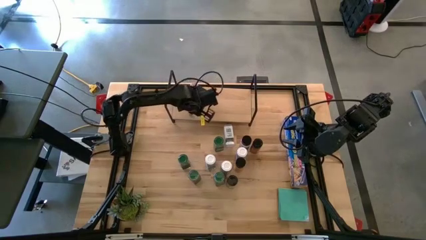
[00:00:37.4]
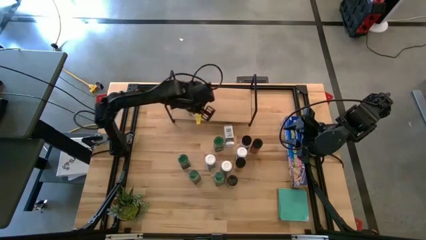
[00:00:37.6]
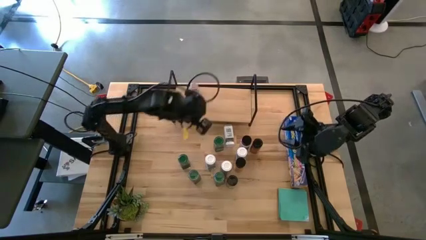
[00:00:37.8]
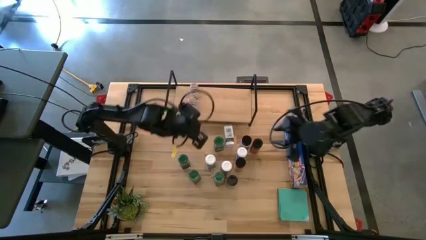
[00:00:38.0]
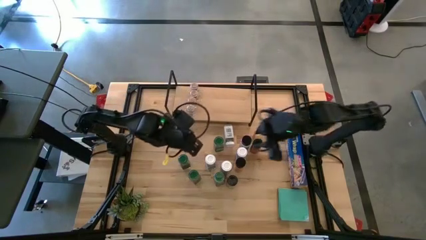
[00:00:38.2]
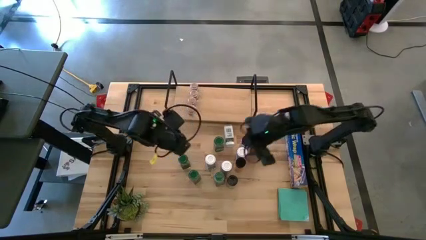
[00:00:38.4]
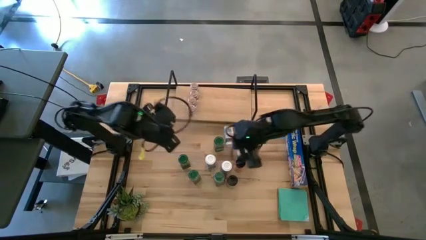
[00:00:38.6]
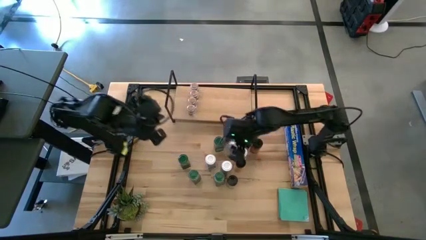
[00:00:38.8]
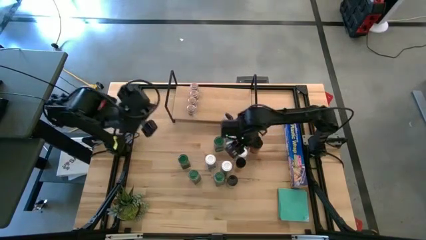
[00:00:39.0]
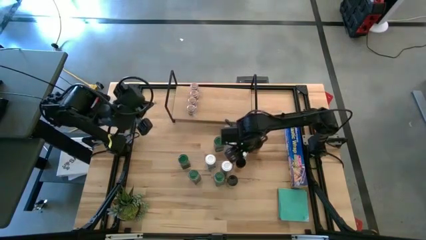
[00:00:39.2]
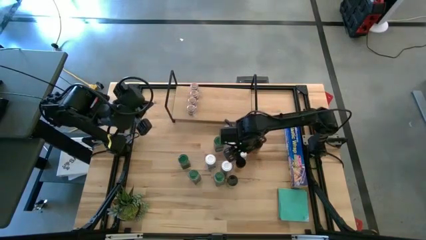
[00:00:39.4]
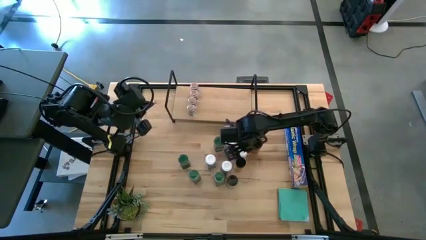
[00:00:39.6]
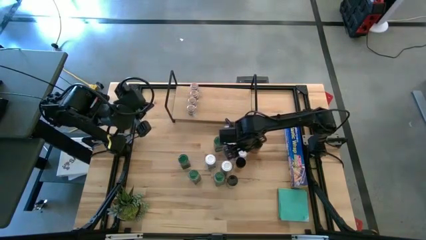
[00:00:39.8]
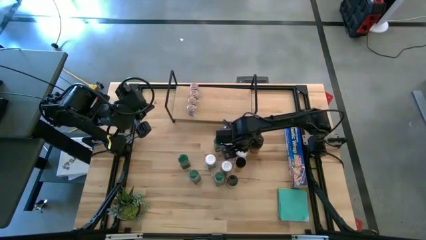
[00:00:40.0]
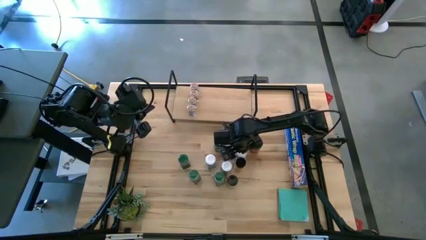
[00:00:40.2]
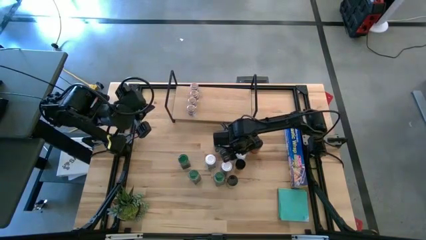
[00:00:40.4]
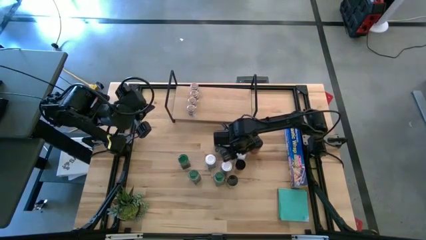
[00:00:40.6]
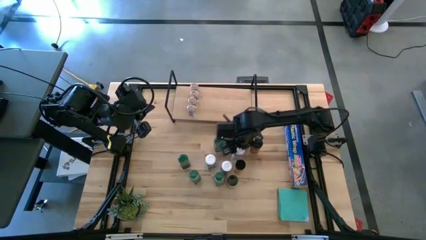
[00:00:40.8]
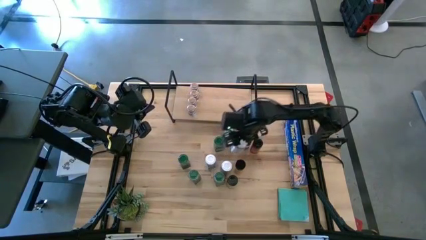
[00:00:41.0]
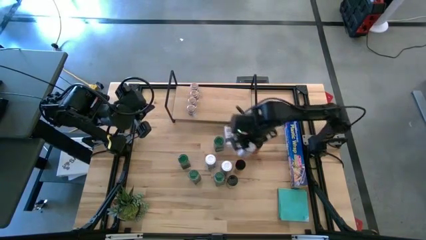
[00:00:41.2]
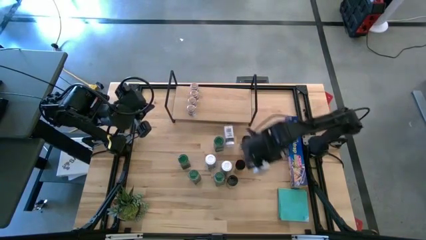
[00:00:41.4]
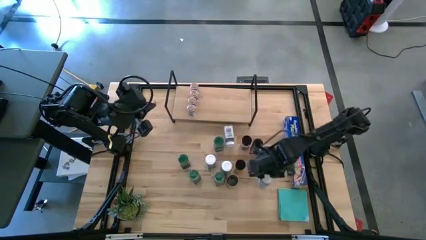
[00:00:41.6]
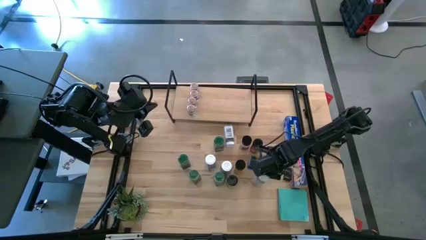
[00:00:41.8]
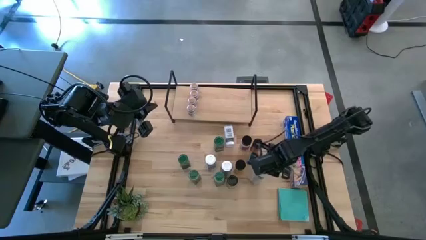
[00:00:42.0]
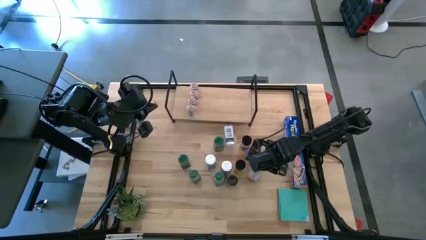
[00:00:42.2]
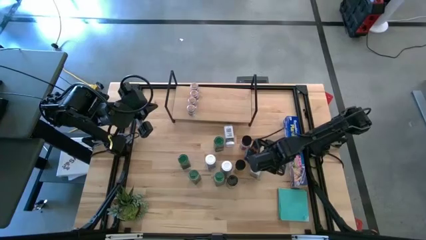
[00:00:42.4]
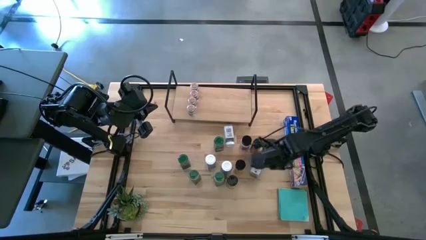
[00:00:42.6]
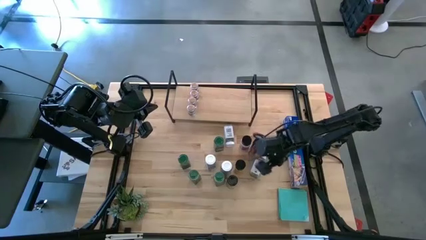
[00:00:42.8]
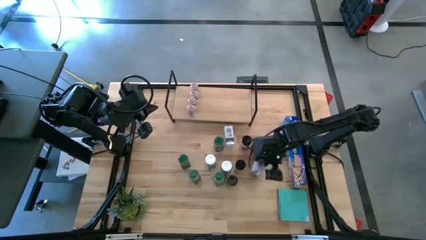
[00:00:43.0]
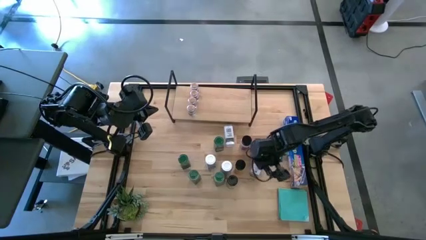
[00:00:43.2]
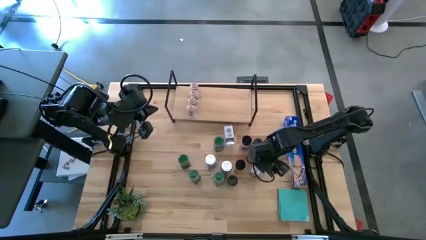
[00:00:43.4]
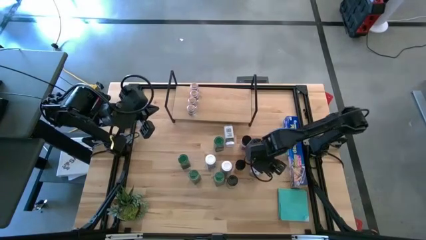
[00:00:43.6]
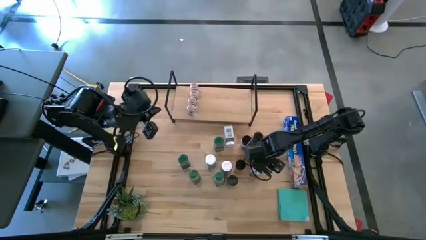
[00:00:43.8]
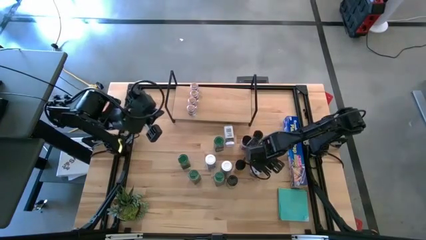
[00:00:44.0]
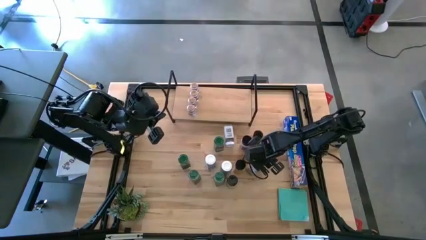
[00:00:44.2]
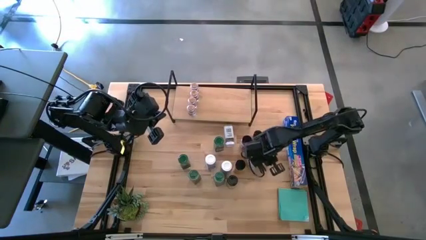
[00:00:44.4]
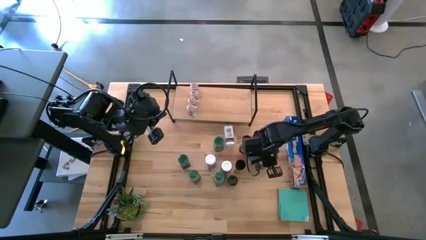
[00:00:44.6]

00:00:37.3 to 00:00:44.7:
Task: Shelf spices
Put the middle right white seasoning bottle on the shelf

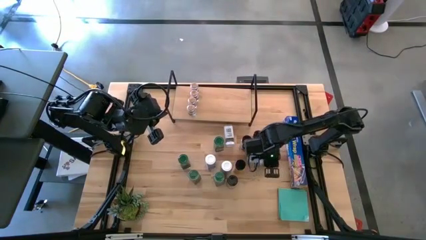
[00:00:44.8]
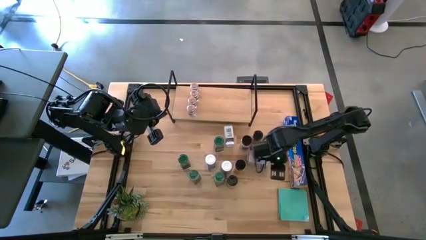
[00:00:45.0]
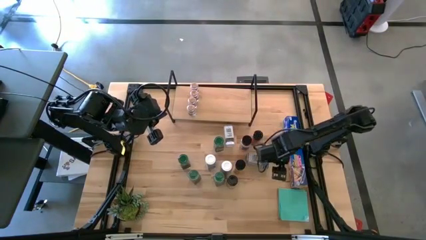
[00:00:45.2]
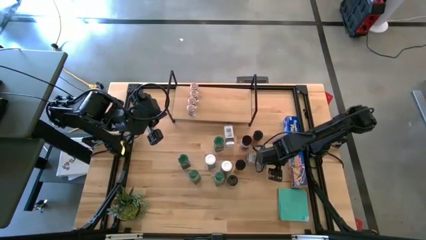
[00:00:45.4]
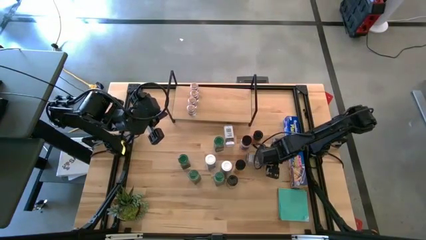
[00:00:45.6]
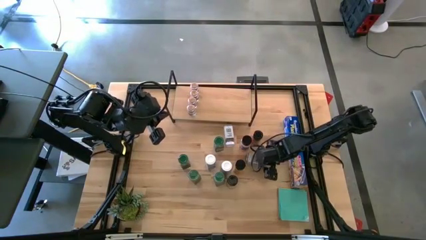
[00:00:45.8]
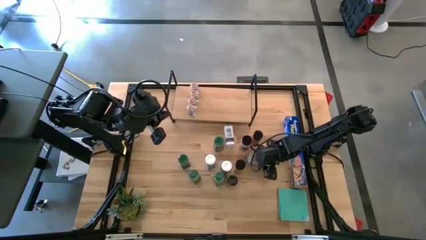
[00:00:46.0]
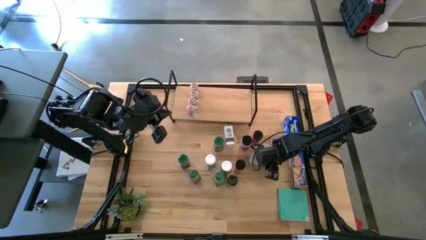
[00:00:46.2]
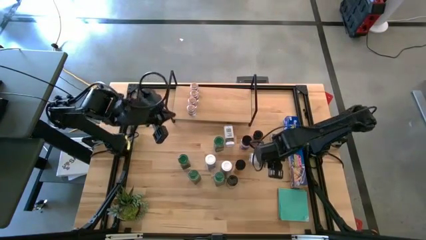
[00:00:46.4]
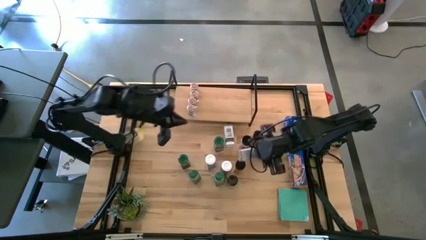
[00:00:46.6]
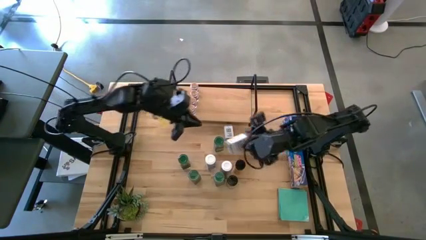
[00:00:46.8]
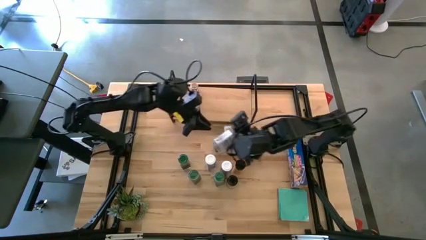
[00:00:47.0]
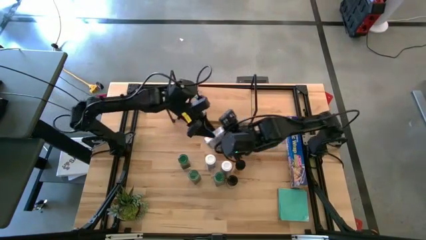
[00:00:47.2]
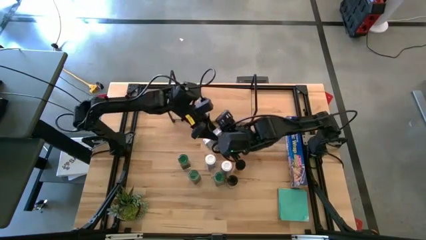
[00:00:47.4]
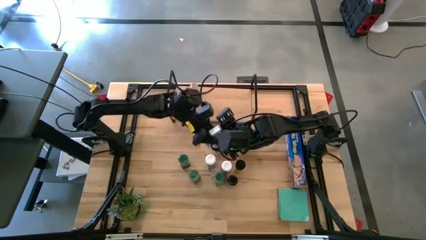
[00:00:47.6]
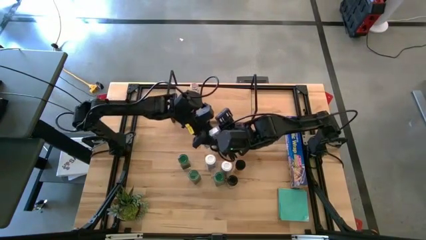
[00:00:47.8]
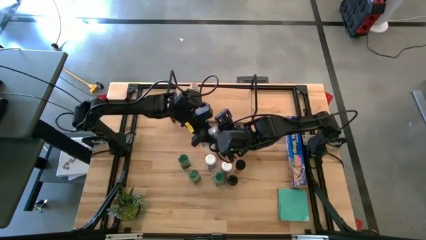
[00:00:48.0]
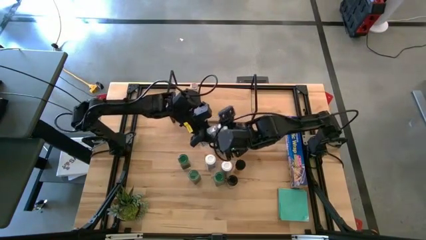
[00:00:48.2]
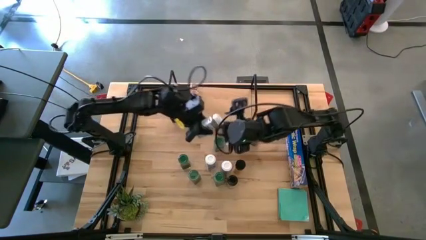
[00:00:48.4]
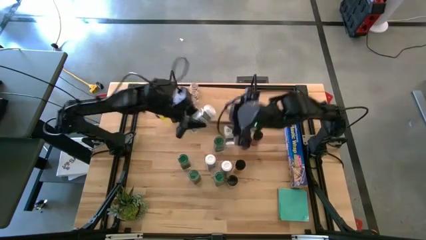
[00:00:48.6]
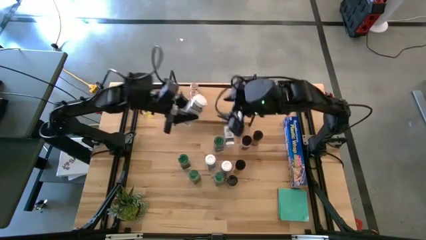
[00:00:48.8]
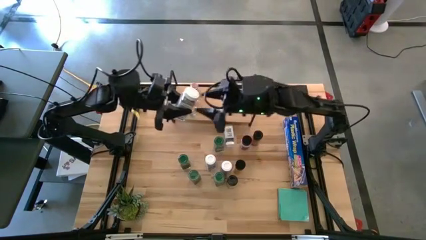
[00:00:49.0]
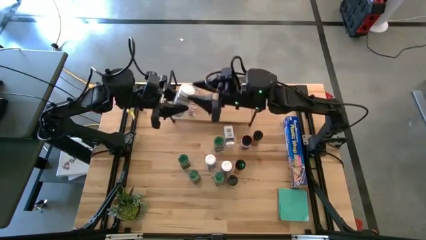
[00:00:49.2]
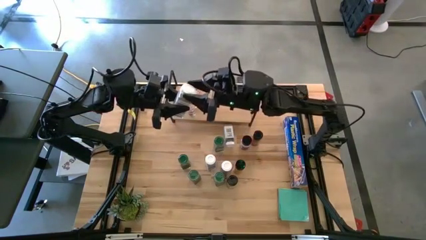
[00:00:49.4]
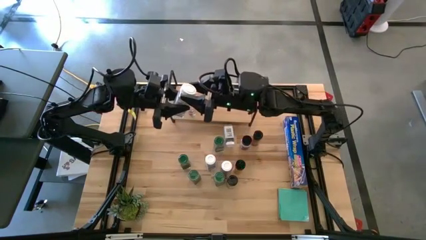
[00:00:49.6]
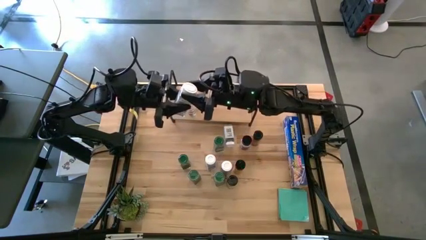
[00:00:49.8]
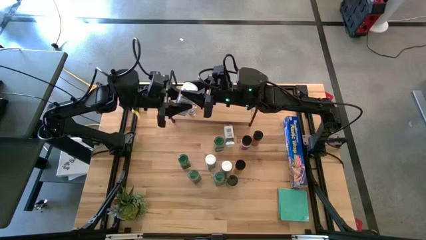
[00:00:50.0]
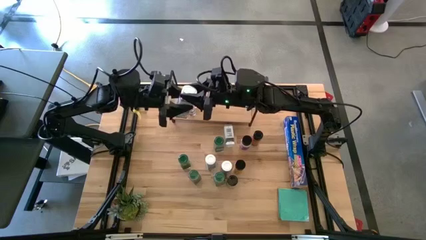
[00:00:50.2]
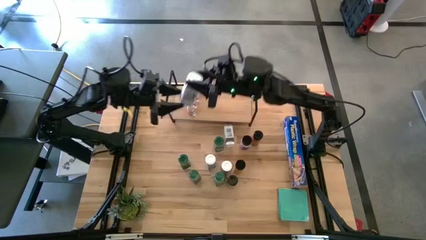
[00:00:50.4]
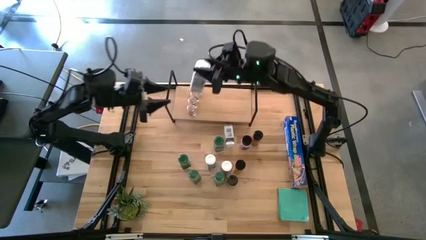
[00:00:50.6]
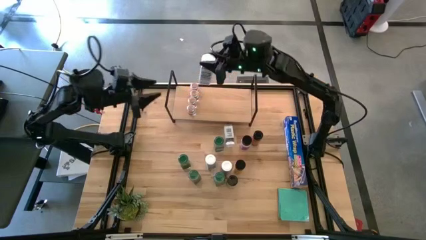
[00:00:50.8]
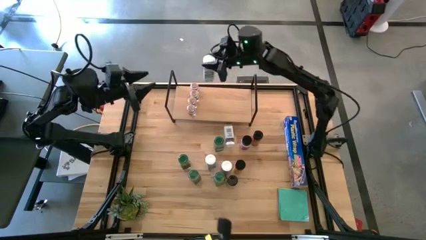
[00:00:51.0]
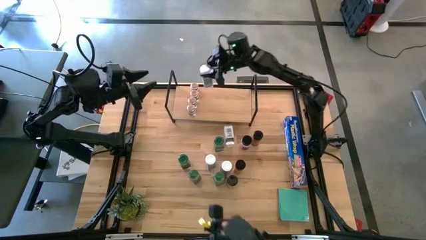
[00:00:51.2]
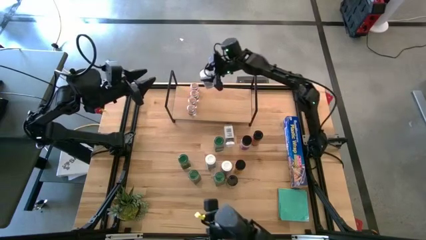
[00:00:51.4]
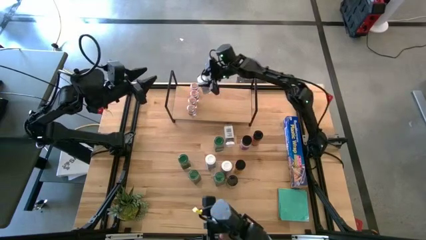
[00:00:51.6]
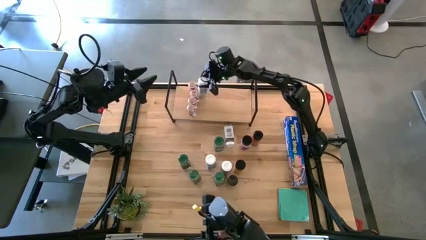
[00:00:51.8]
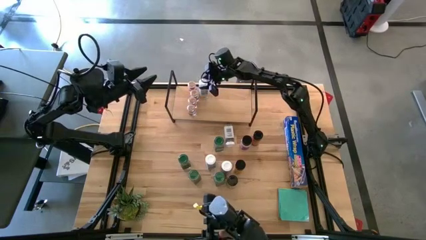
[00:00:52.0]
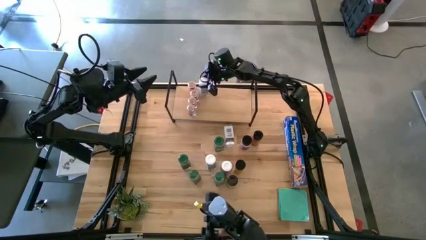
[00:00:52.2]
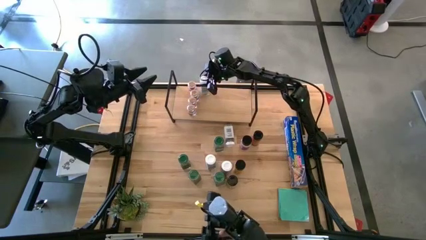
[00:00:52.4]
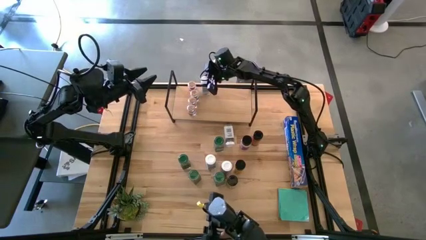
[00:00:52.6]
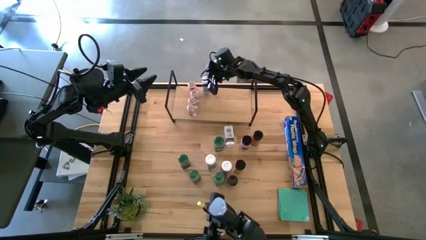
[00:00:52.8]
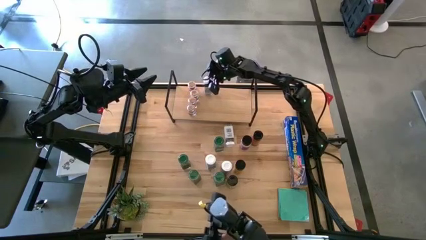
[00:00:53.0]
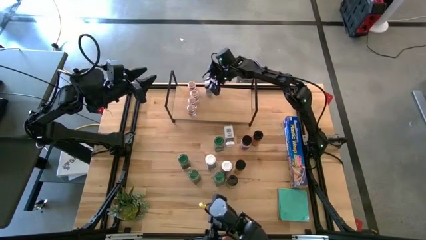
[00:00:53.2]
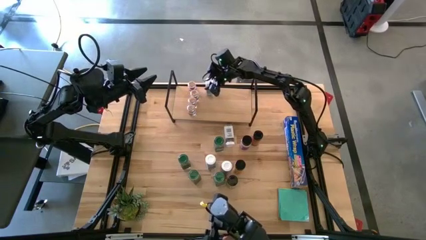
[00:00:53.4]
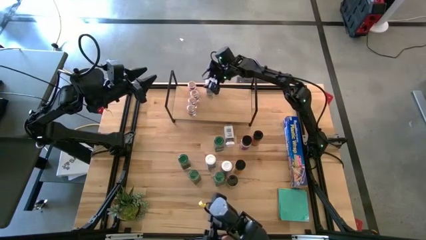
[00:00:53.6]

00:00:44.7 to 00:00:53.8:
Put the middle right white seasoning bottle on the shelf
